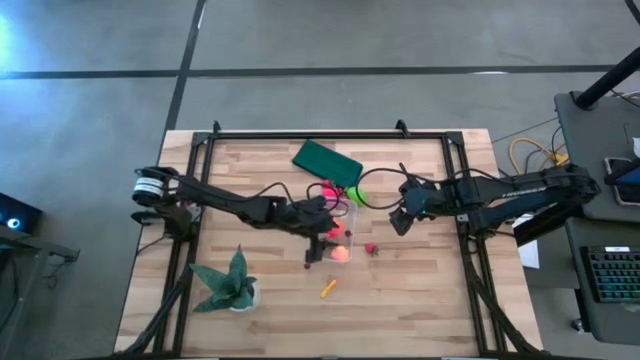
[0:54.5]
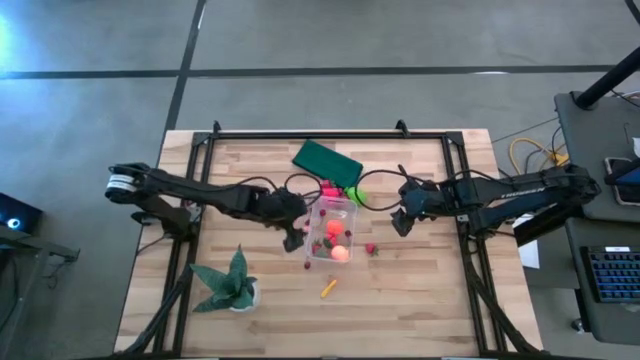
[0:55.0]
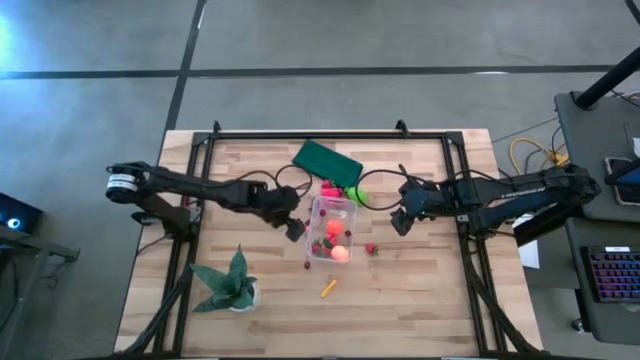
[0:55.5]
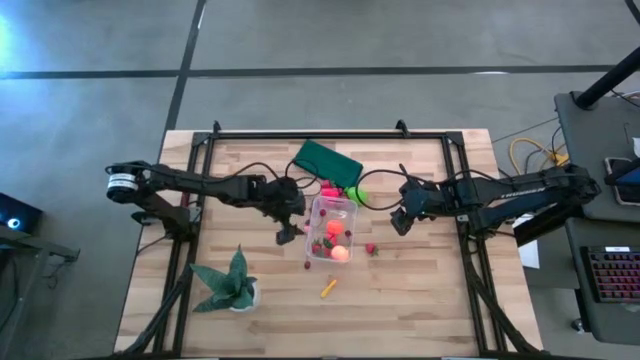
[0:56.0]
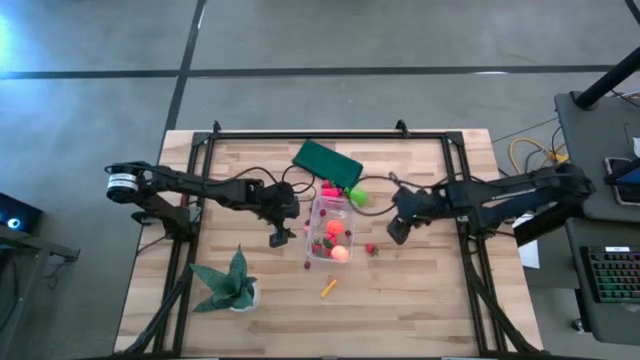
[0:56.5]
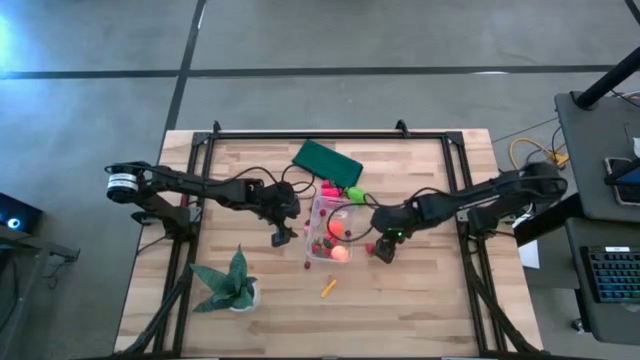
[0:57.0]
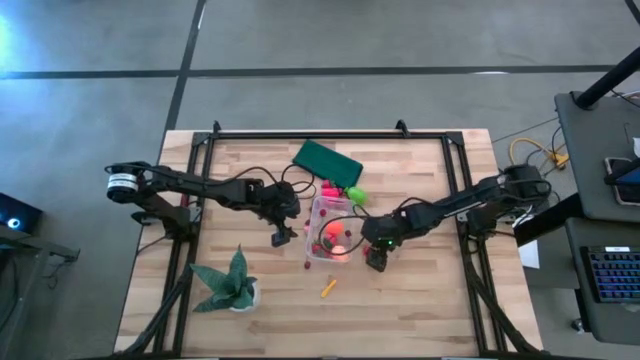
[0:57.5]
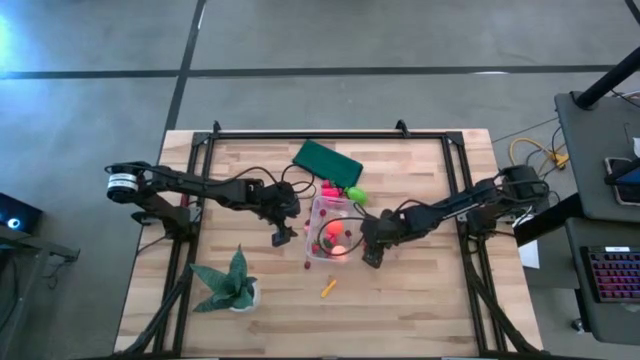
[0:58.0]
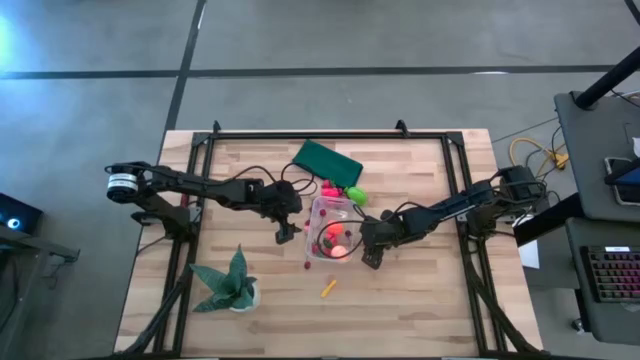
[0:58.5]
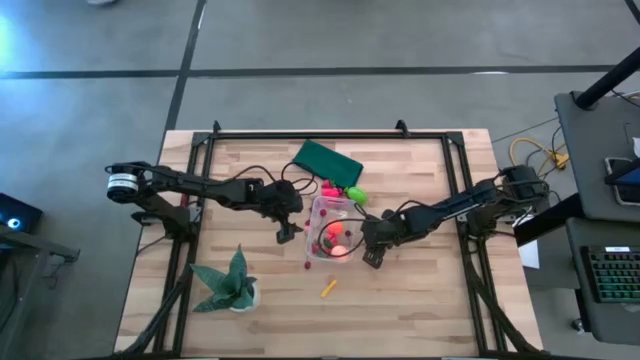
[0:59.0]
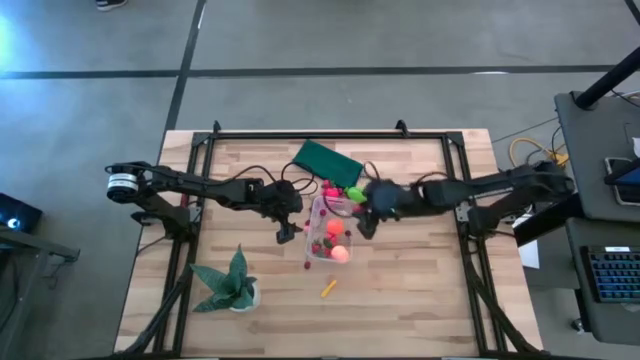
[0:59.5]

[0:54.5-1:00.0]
Task: Pick and placing Produce into tupperware
Put the red strawberry into the transparent bin

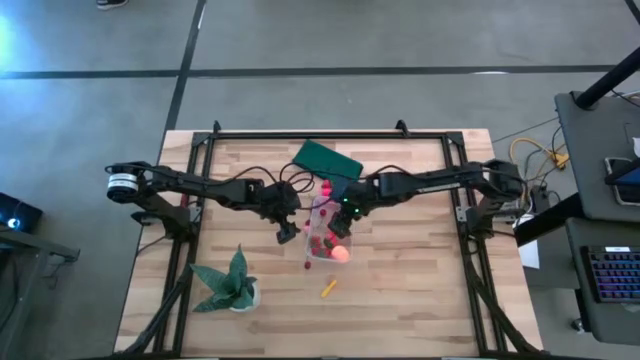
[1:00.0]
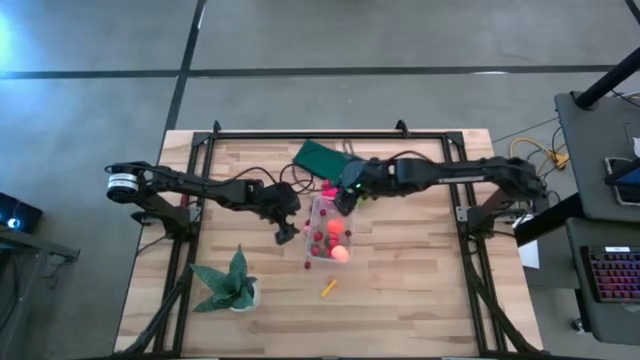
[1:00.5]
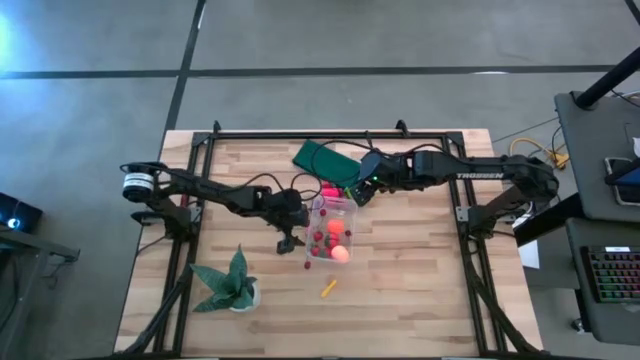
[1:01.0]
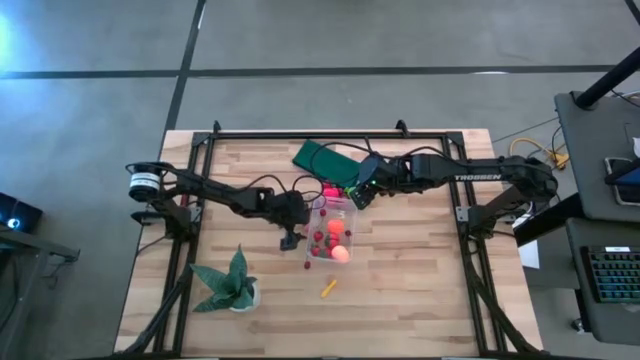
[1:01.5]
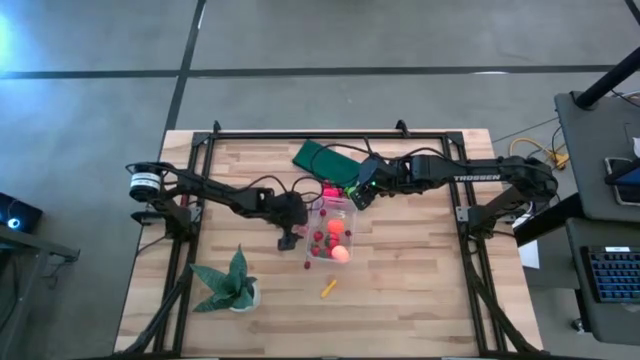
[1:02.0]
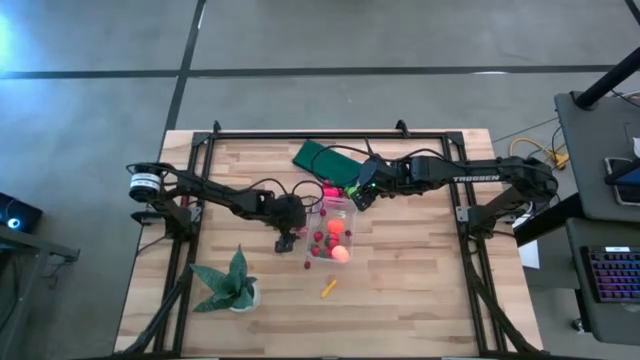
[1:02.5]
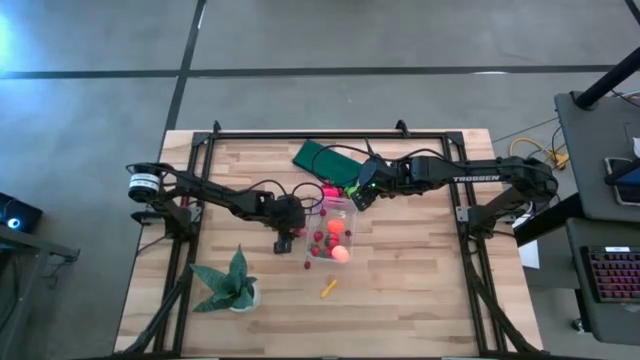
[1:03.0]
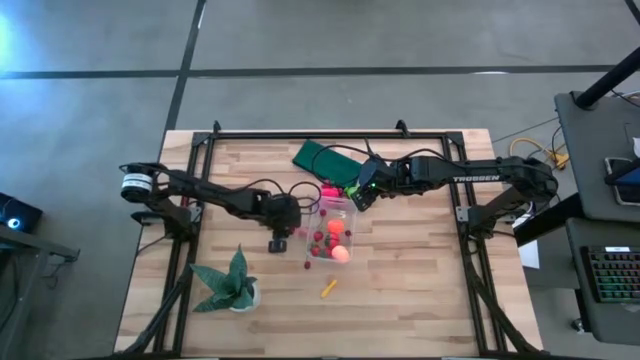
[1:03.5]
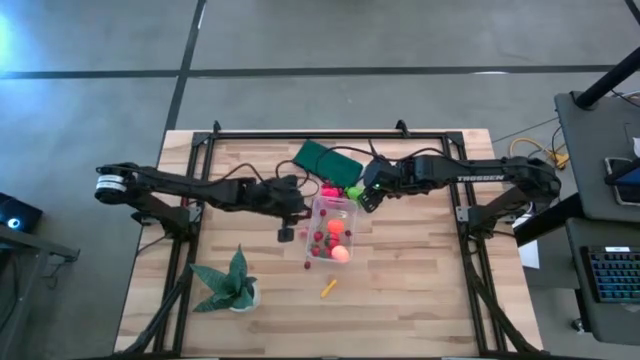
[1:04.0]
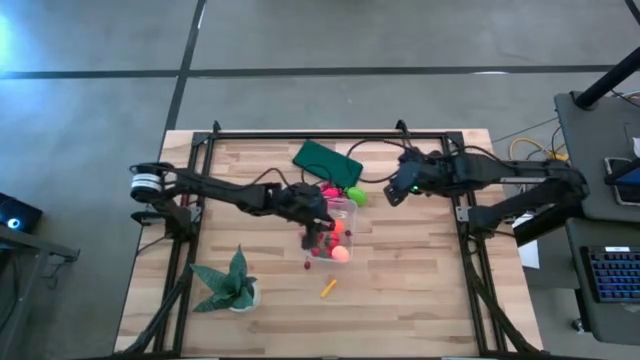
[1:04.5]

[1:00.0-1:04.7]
Put the red cherry into the transparent bin

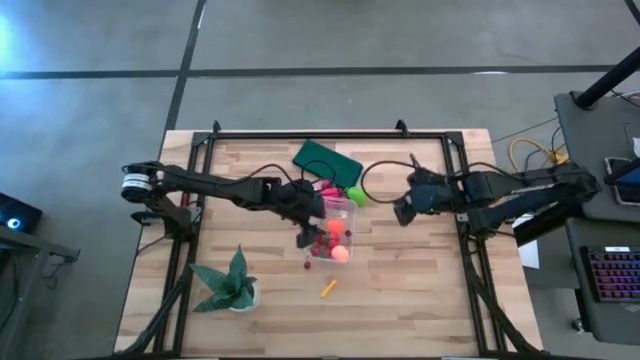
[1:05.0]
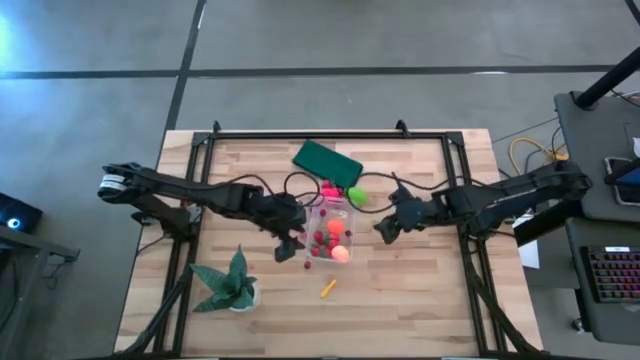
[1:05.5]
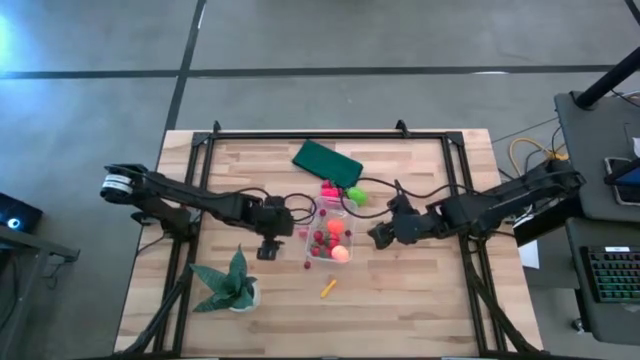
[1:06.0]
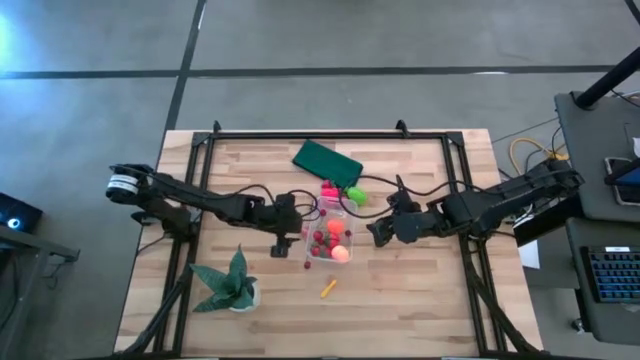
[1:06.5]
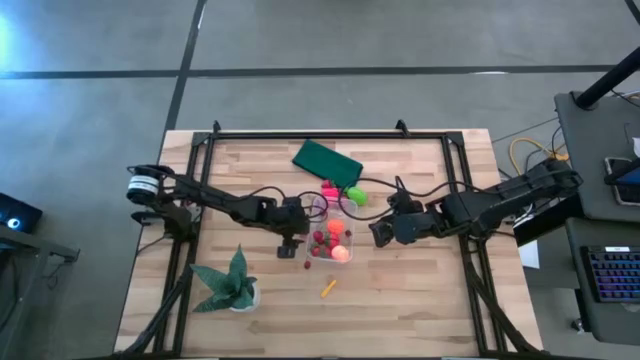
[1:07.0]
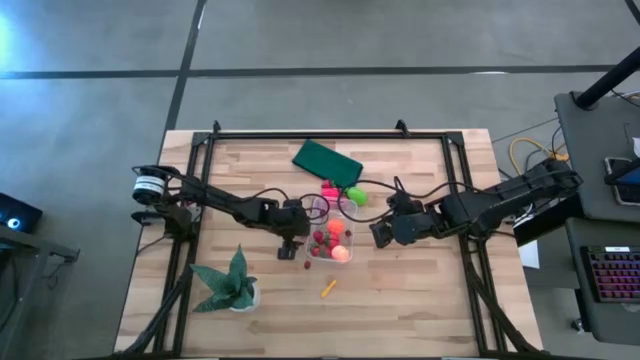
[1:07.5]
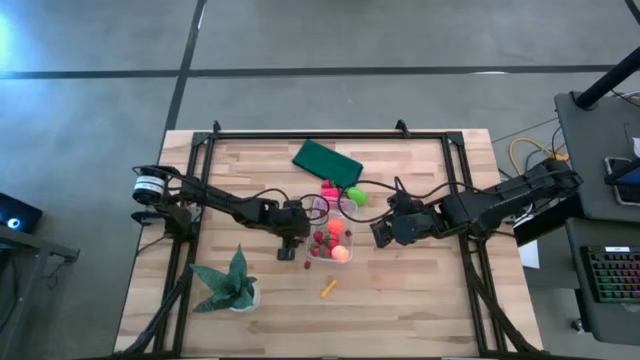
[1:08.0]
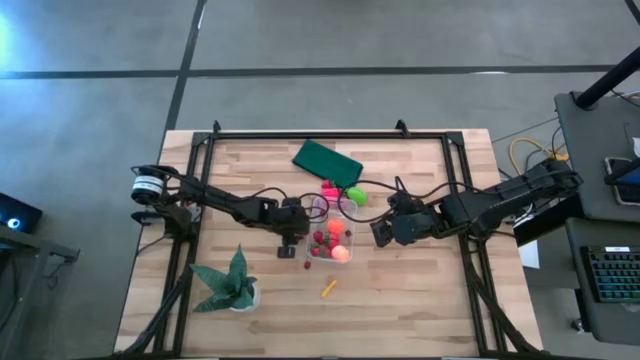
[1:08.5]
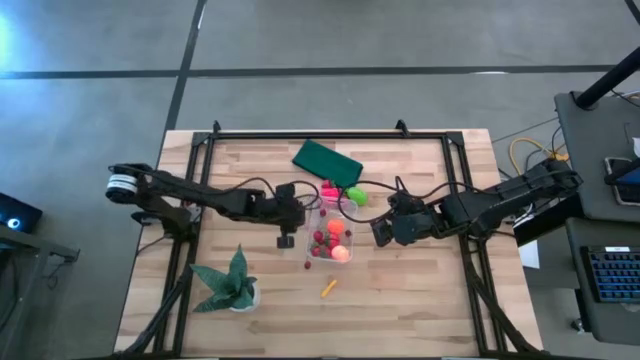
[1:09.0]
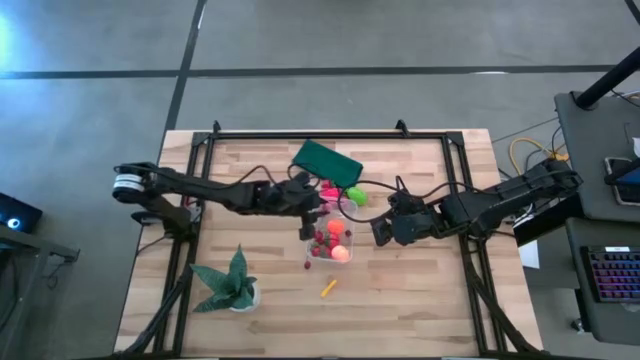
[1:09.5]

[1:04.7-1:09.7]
Put the pink peach into the transparent bin

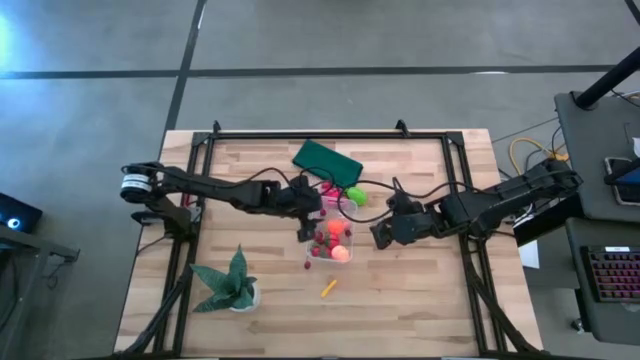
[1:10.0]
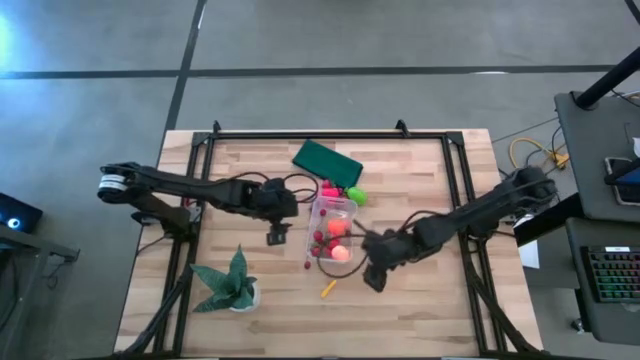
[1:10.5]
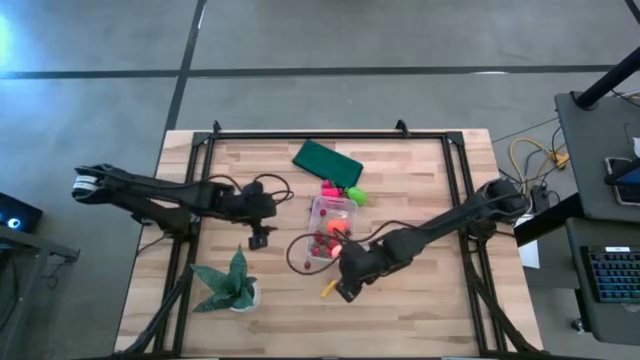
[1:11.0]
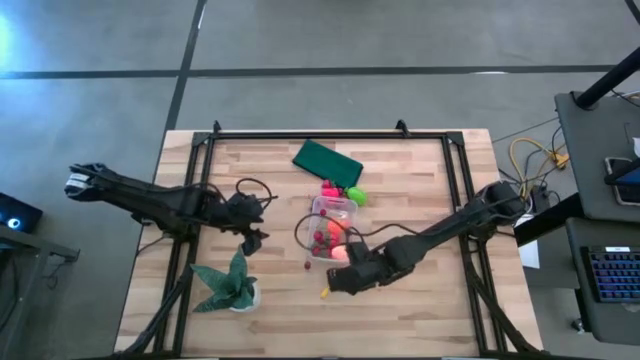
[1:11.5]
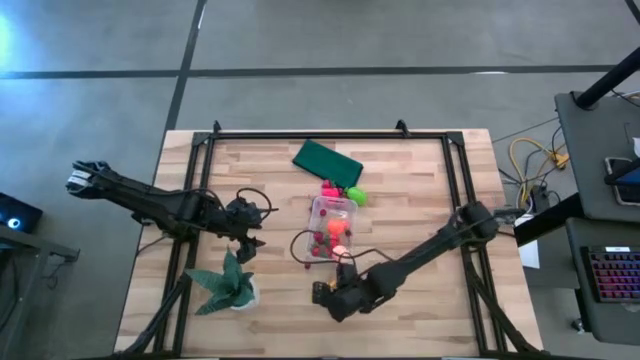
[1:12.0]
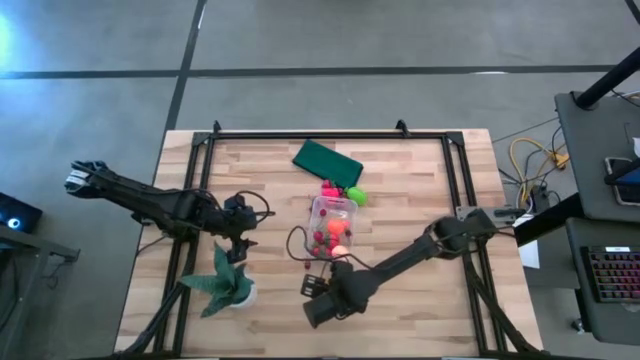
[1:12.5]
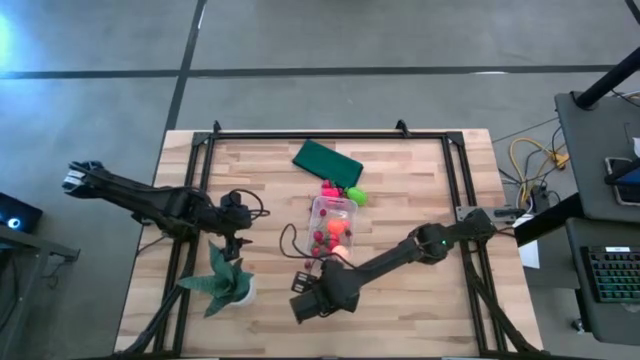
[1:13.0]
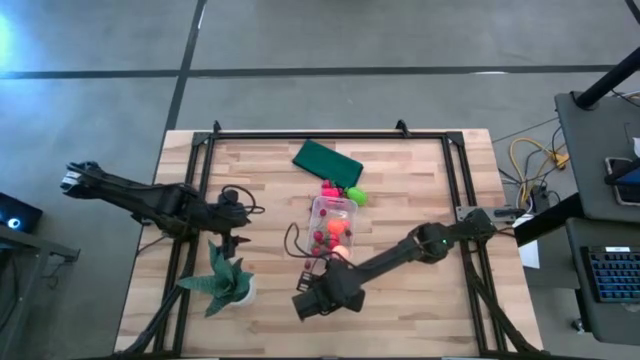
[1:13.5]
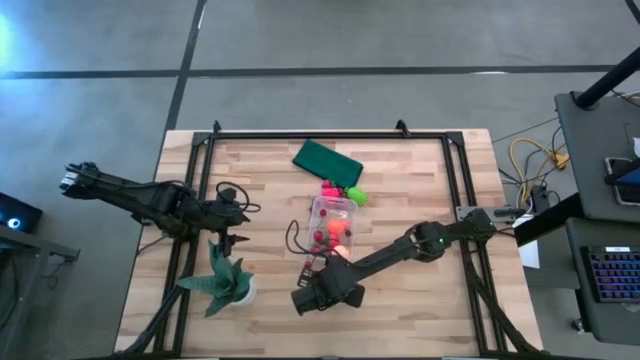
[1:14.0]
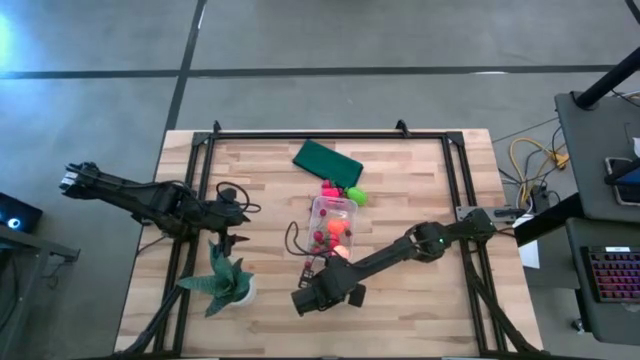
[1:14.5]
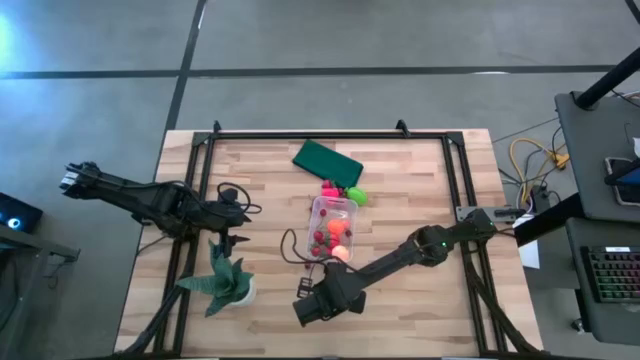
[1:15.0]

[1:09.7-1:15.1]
Put the yellow corn into the transparent bin

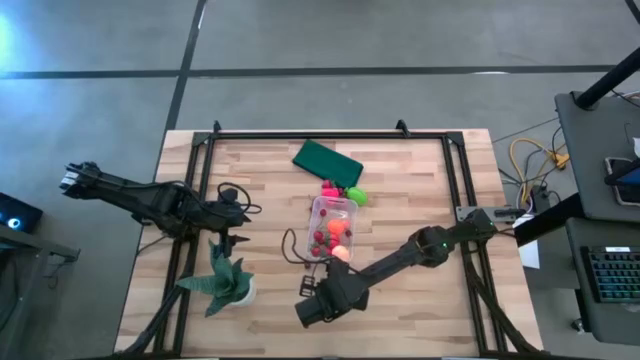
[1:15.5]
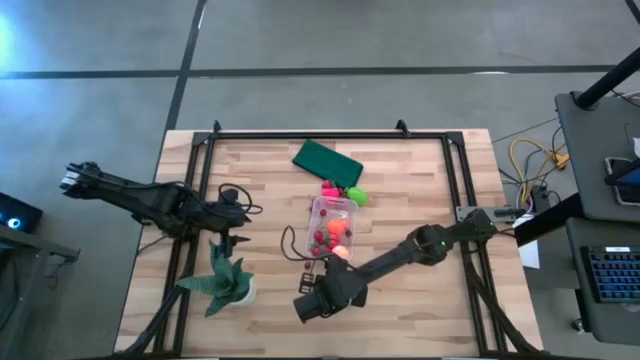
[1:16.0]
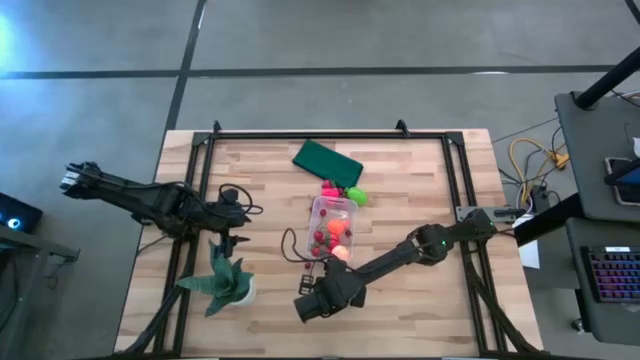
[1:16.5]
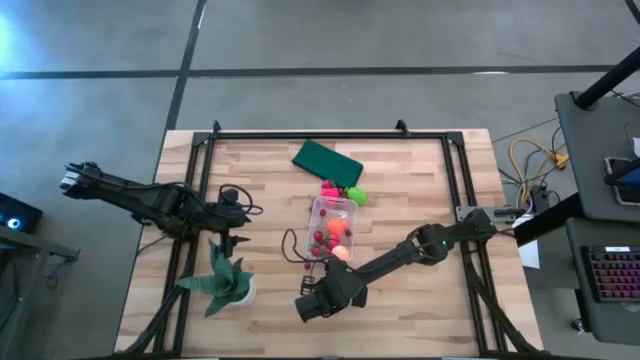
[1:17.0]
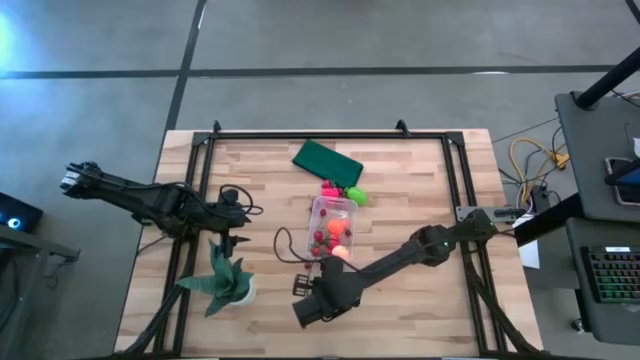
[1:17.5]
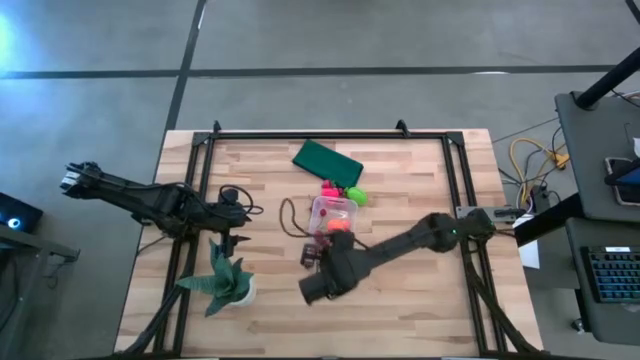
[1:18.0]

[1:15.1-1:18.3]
Put the yellow corn into the transparent bin
